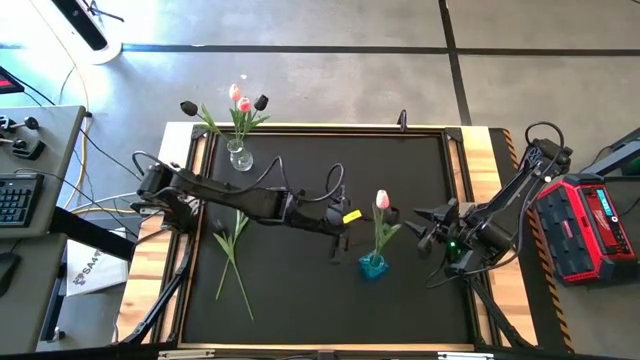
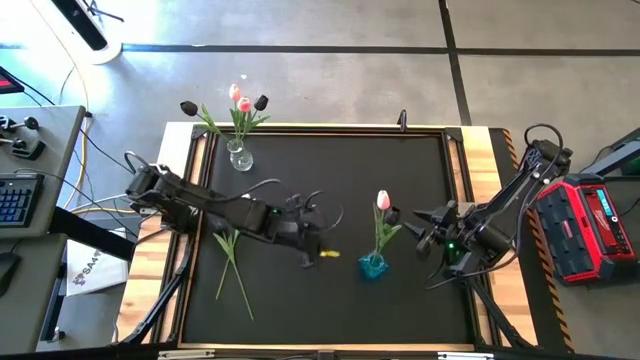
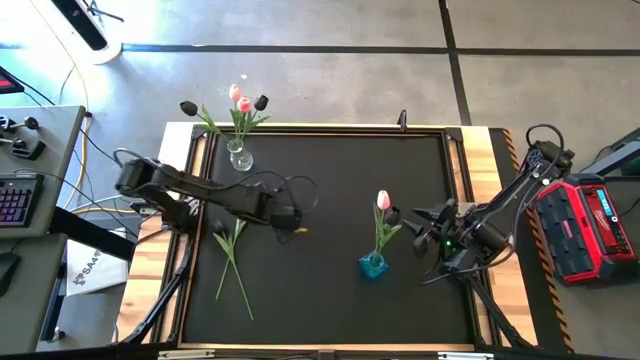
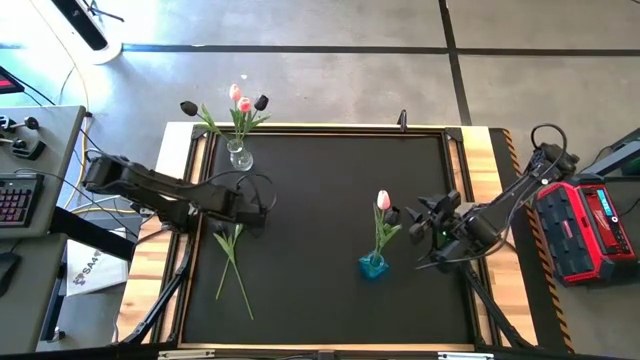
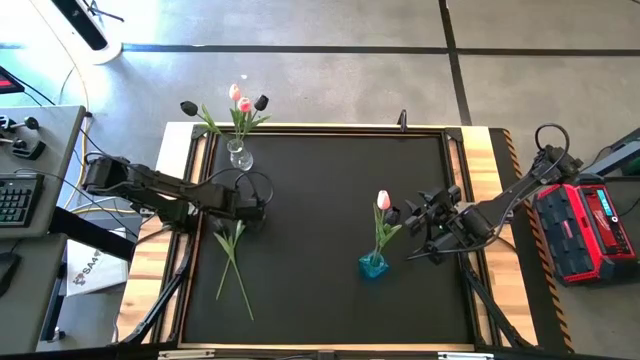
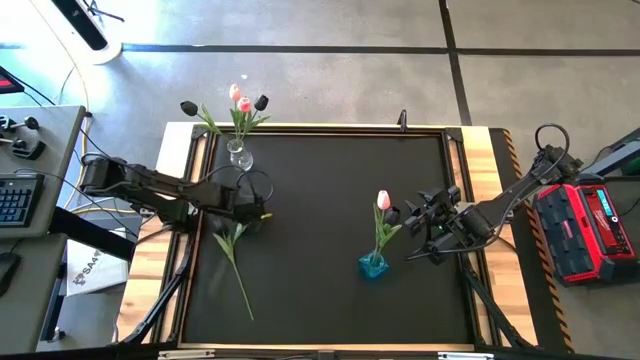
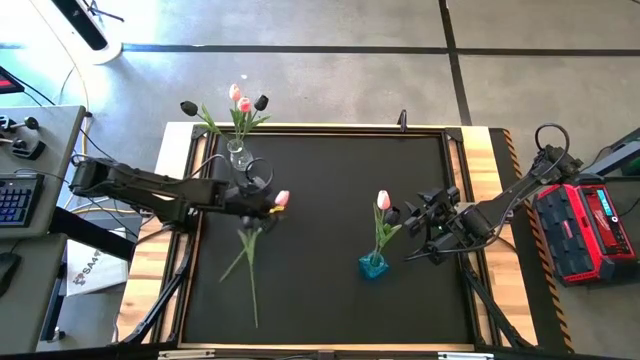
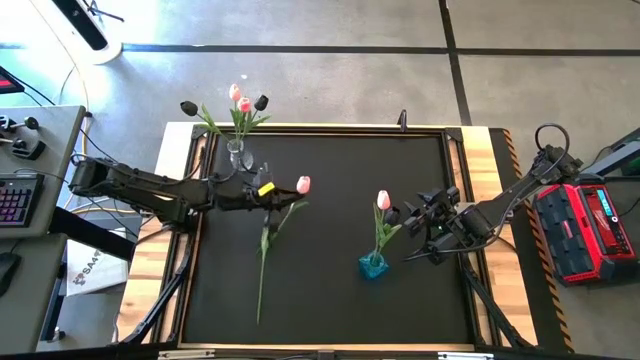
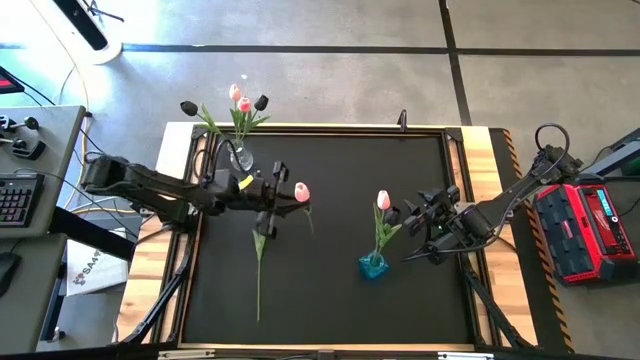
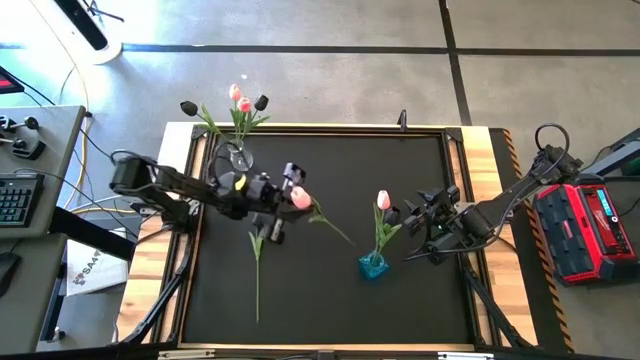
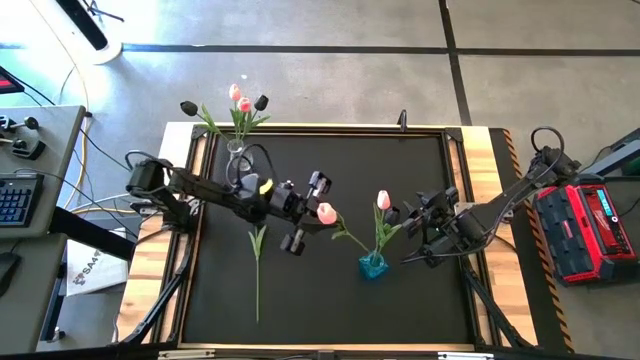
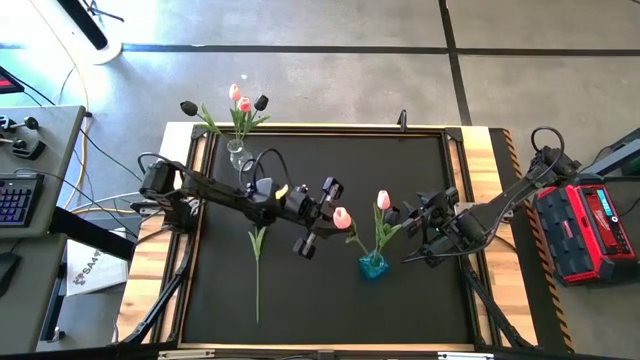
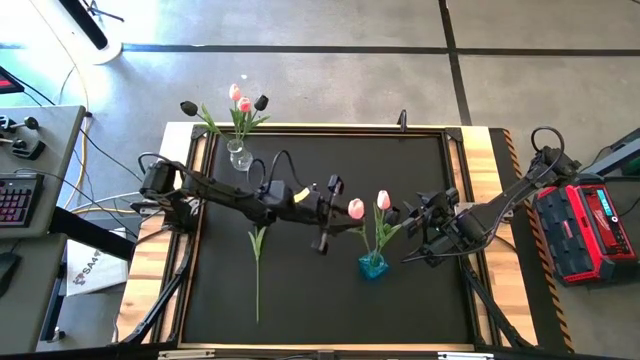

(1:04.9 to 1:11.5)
Task: Sort flowers into vase by color
Put the pink flower into the blue vase

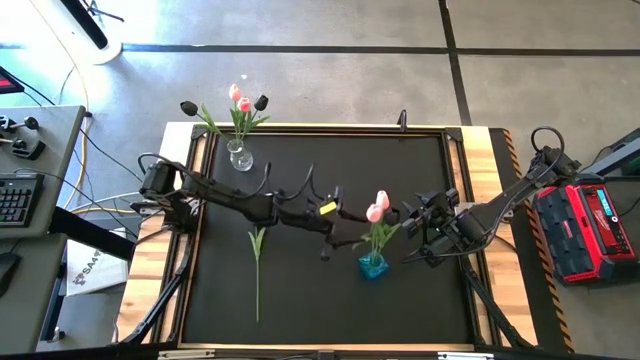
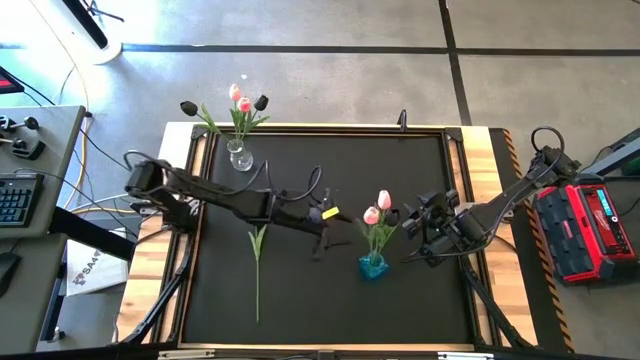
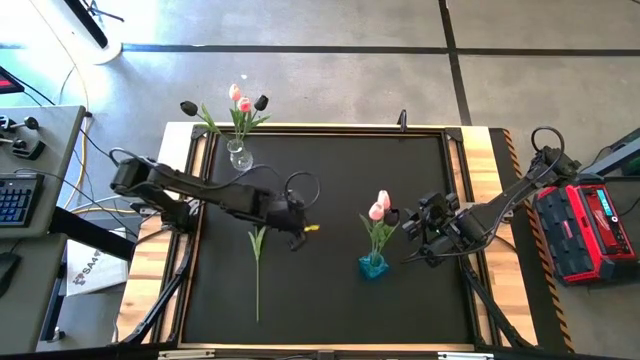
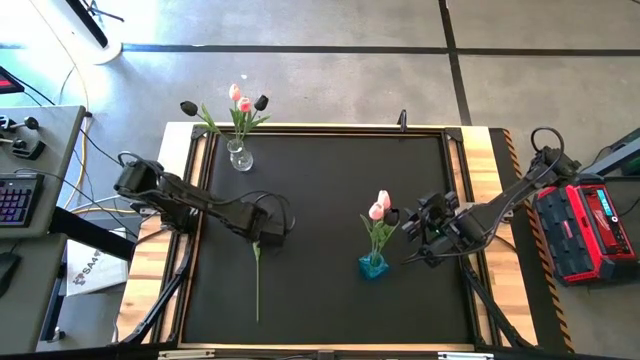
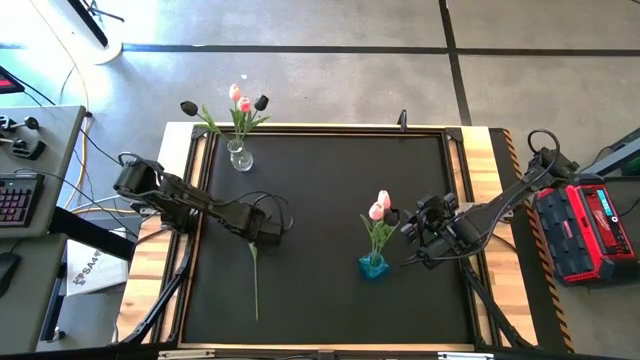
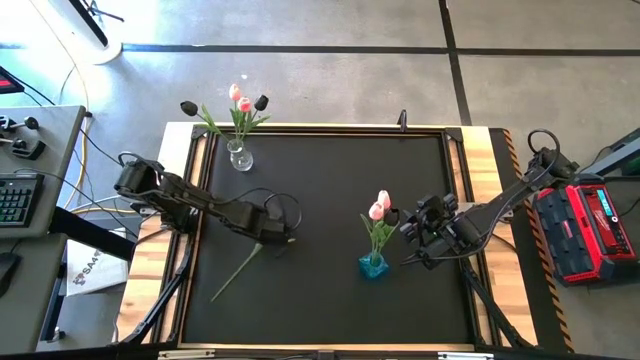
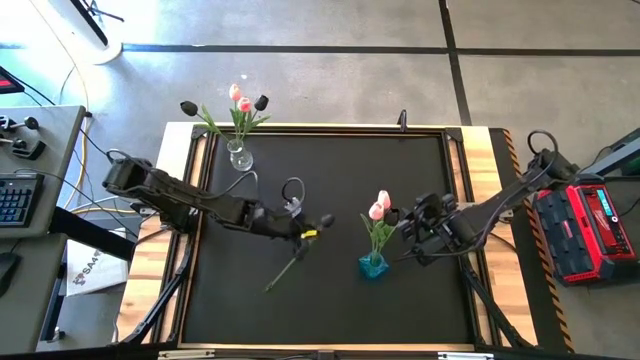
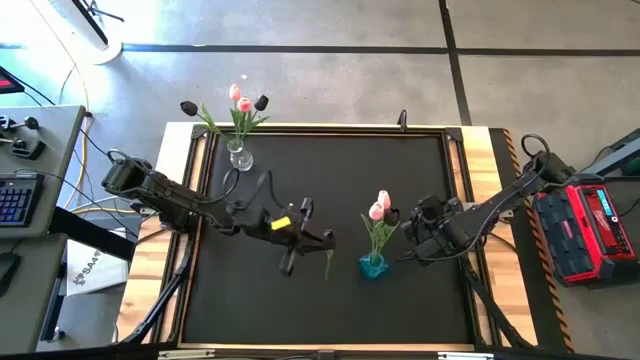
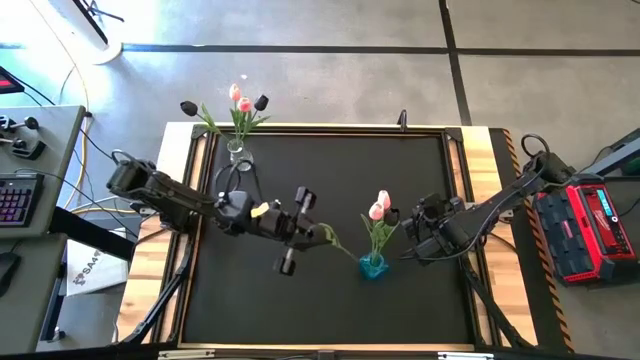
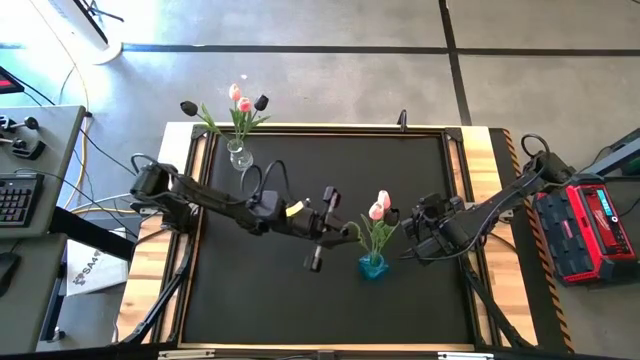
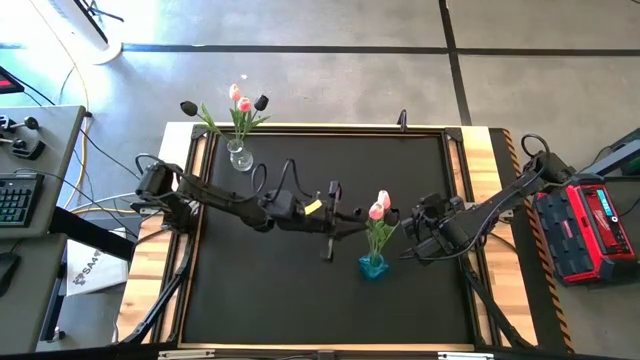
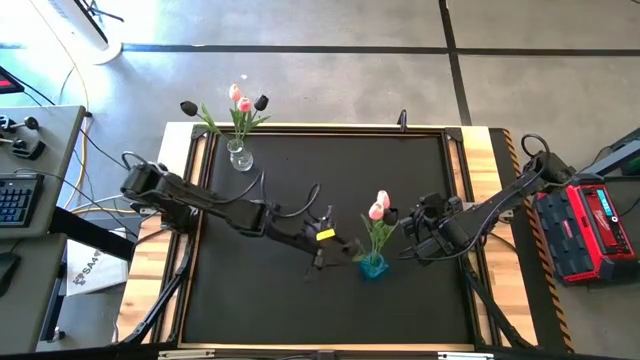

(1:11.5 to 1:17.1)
Put the black flower into the blue vase

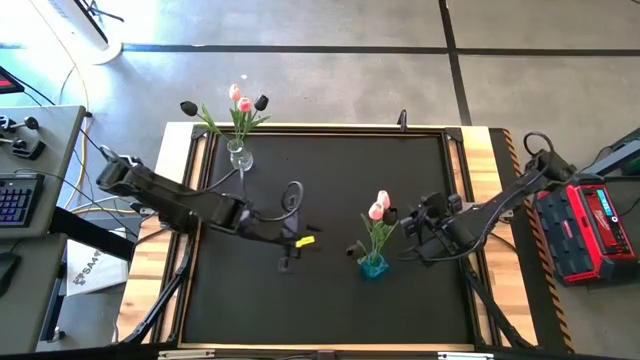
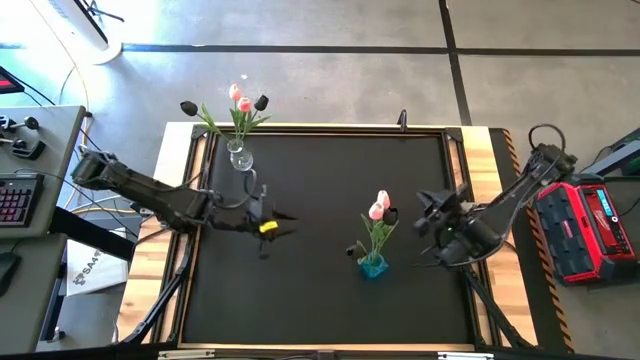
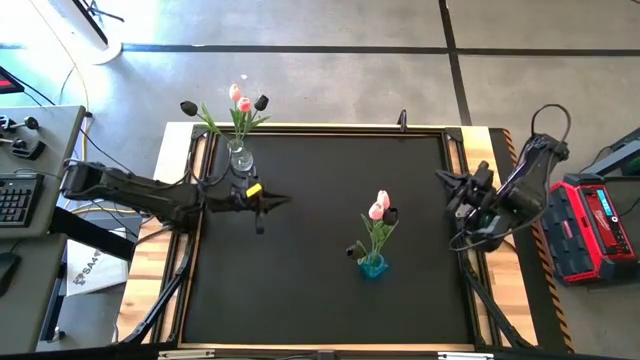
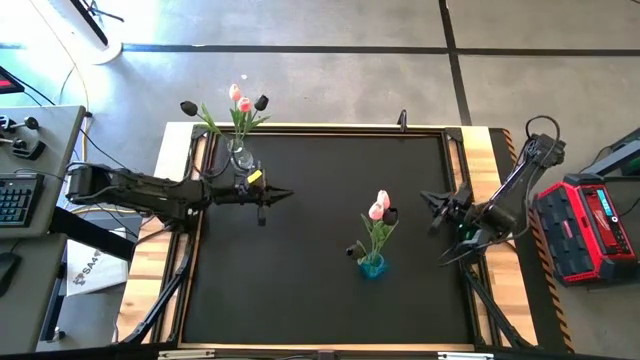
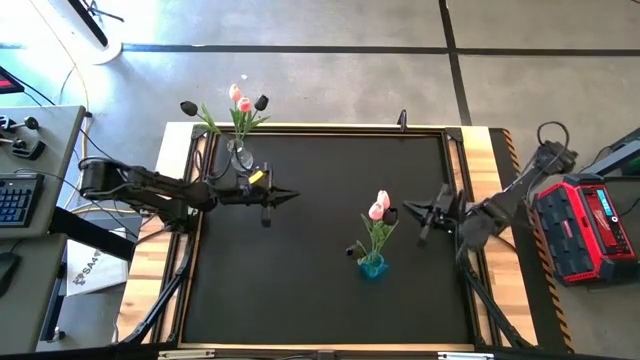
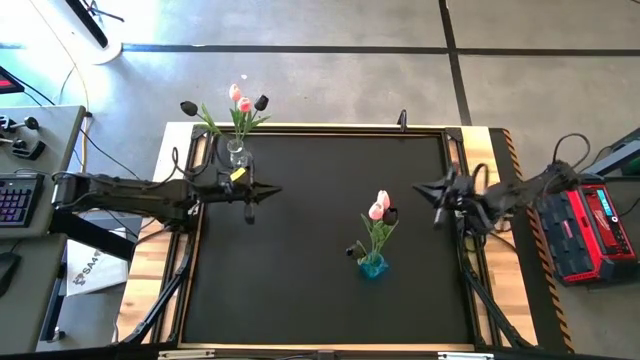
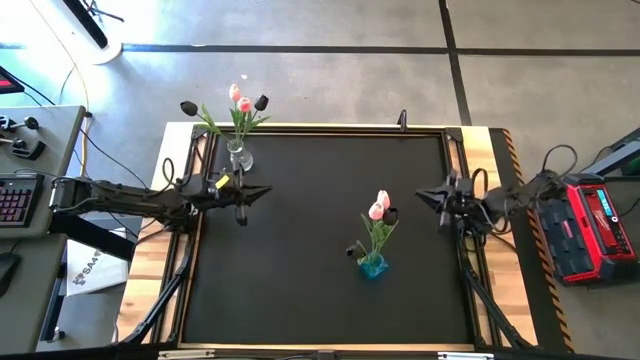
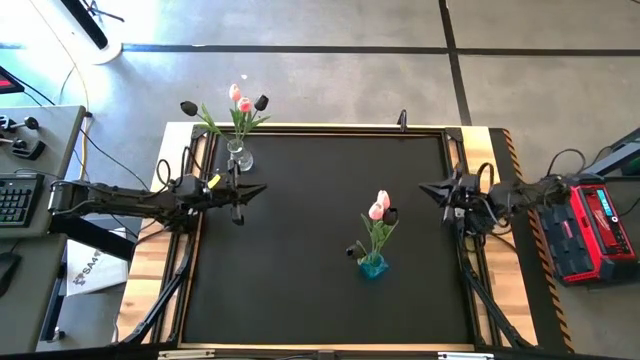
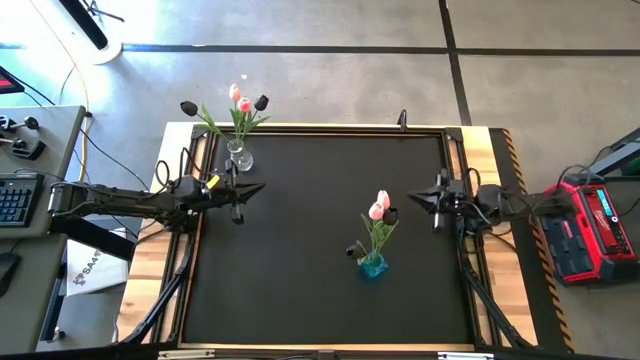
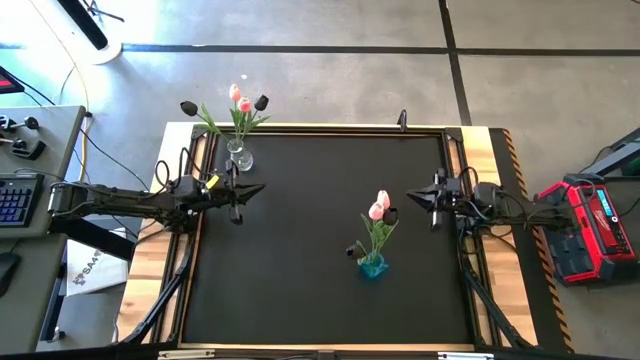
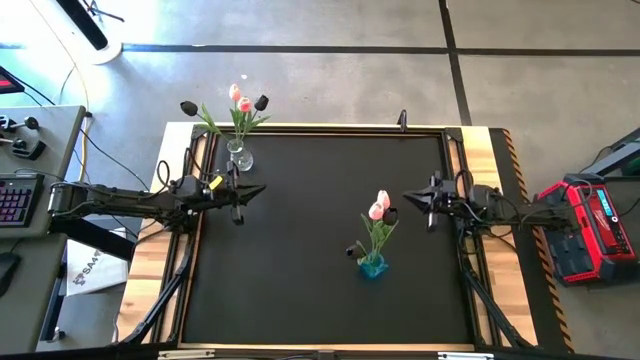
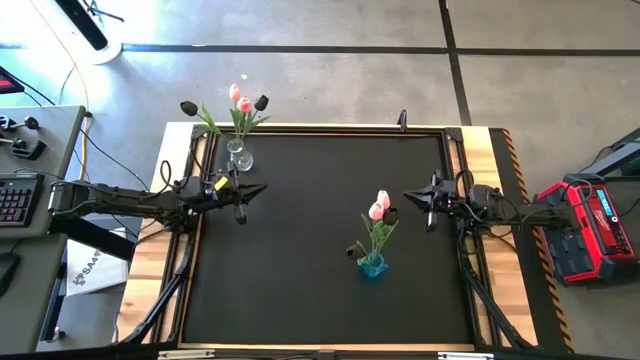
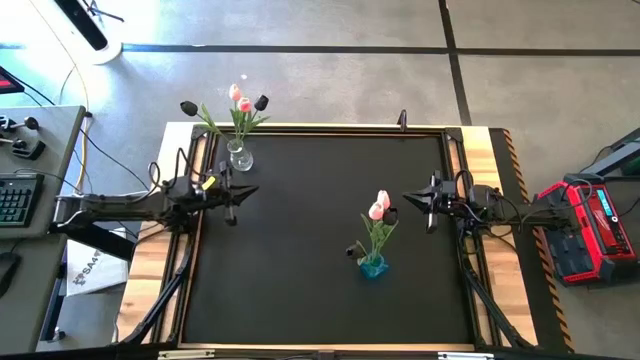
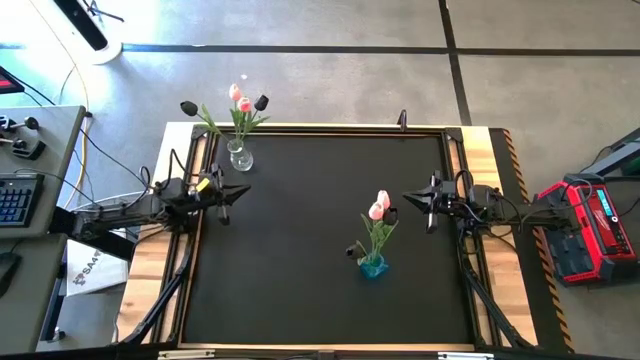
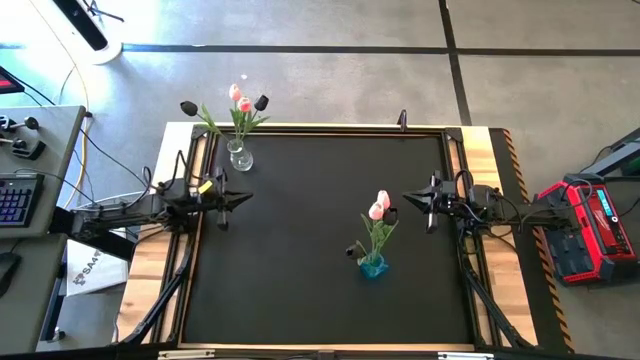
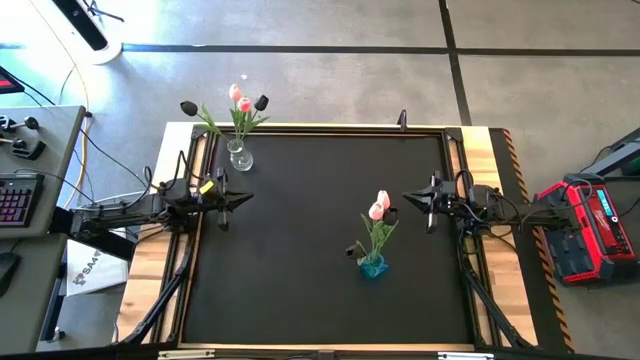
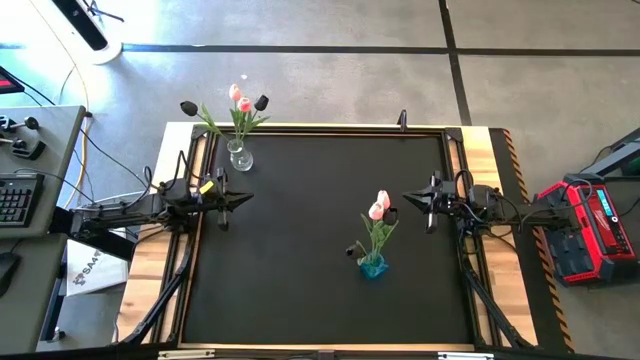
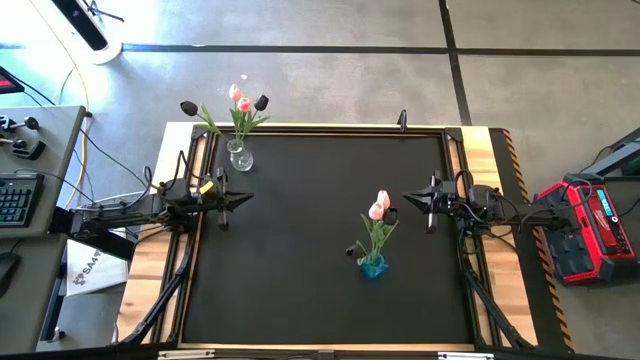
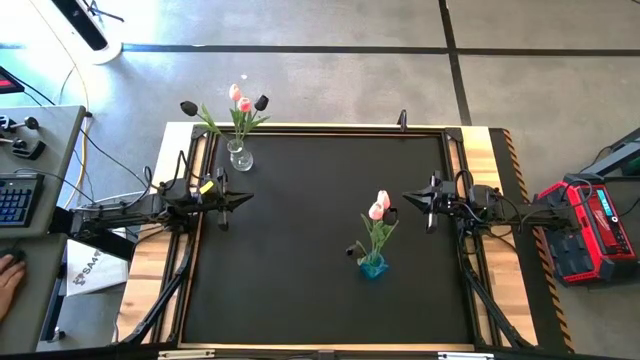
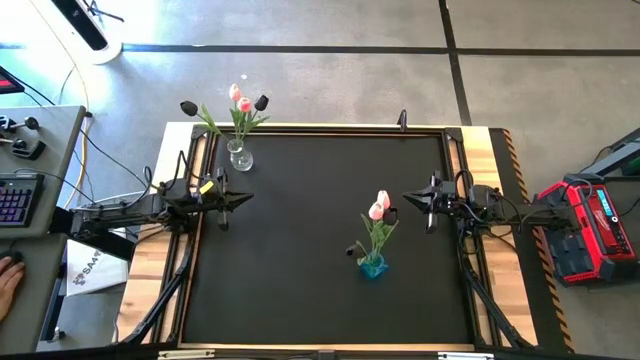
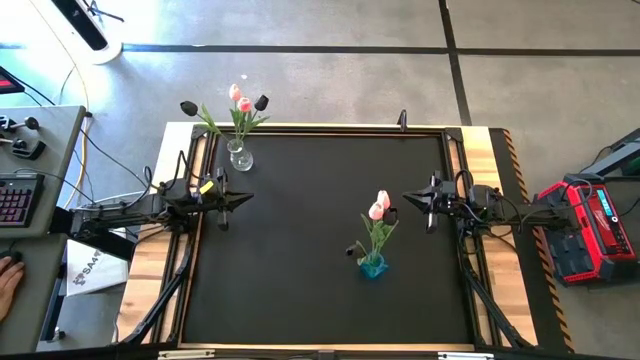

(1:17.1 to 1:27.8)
Return to Home Position
